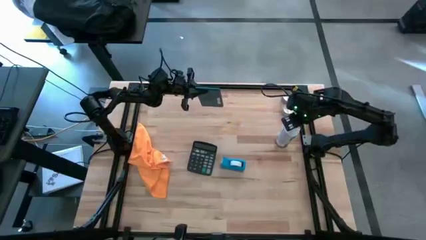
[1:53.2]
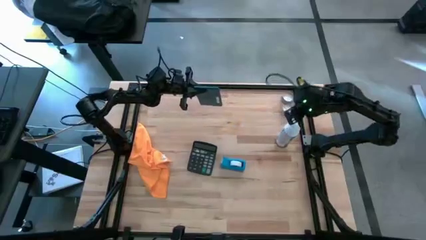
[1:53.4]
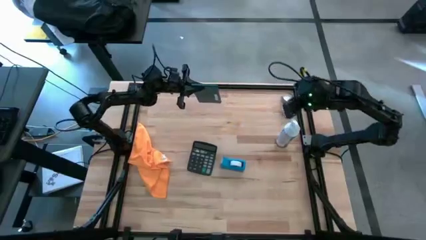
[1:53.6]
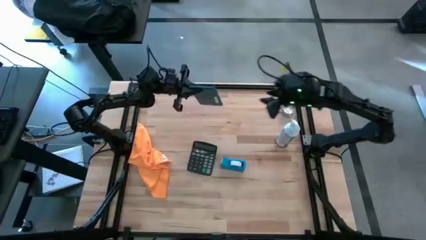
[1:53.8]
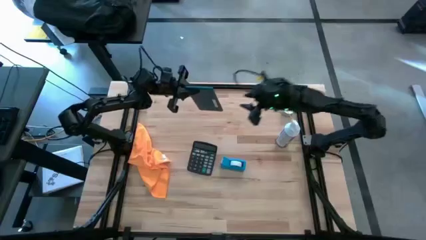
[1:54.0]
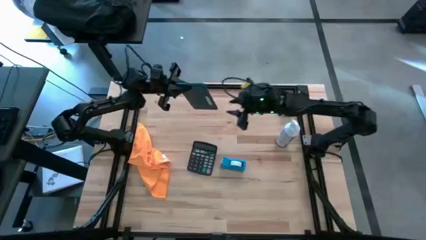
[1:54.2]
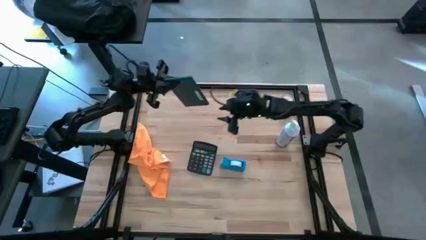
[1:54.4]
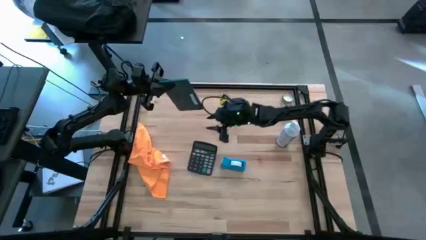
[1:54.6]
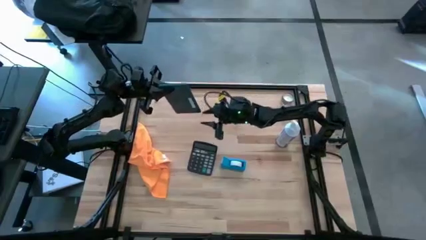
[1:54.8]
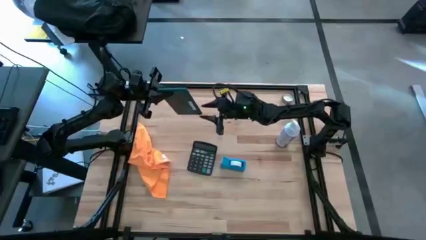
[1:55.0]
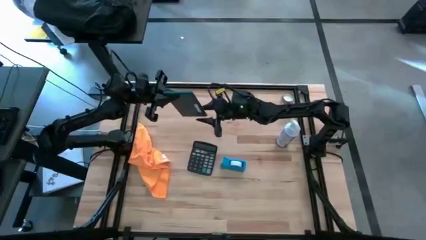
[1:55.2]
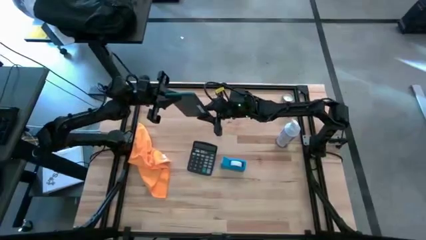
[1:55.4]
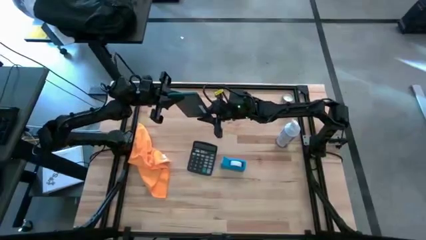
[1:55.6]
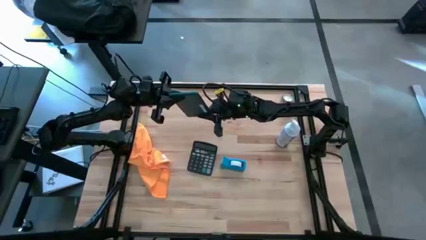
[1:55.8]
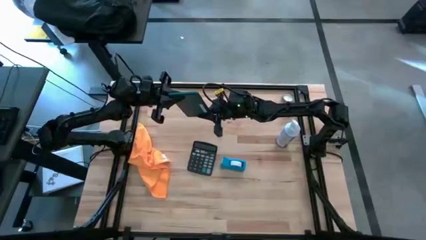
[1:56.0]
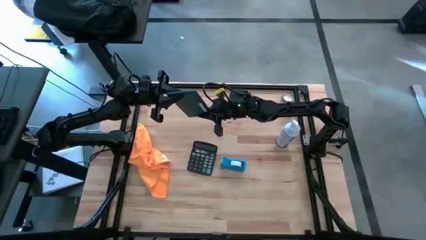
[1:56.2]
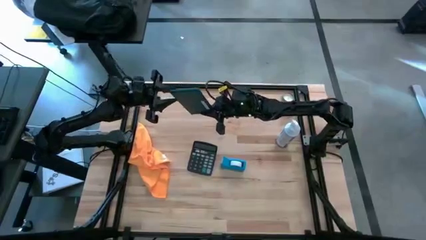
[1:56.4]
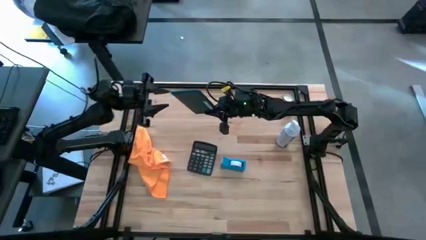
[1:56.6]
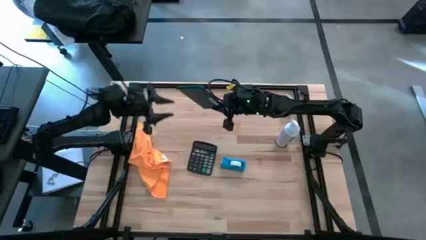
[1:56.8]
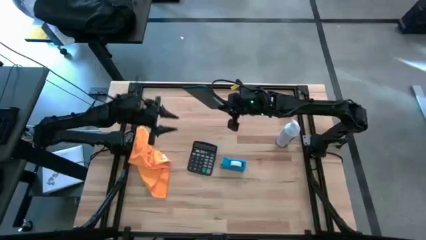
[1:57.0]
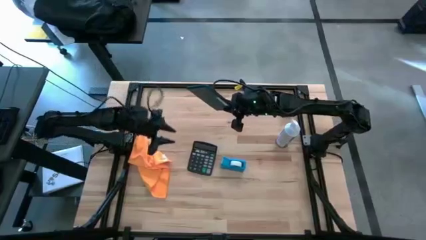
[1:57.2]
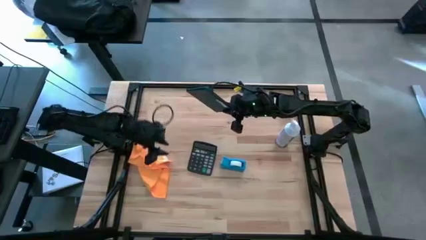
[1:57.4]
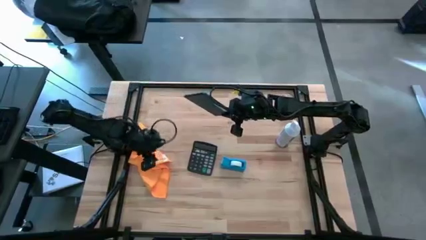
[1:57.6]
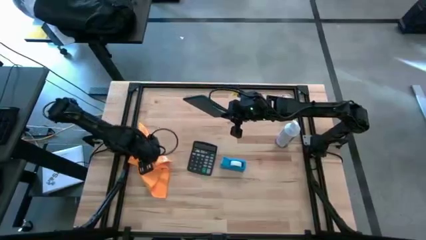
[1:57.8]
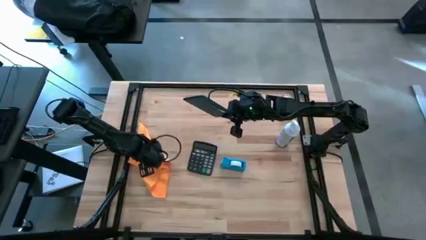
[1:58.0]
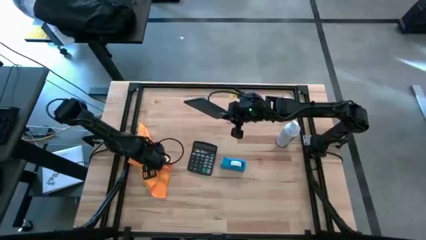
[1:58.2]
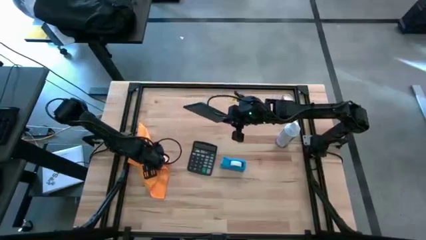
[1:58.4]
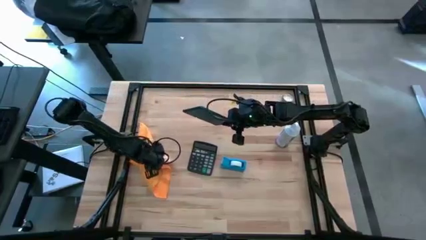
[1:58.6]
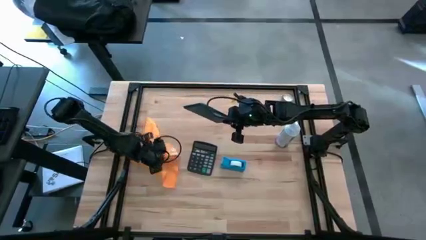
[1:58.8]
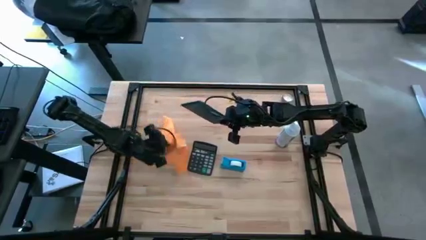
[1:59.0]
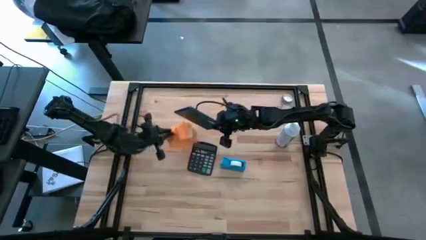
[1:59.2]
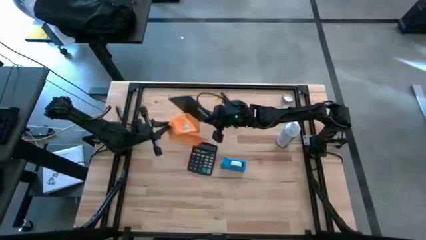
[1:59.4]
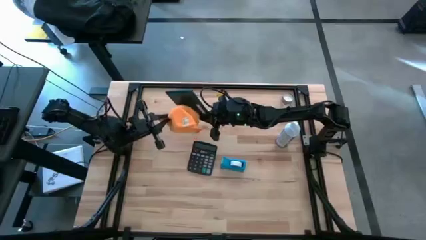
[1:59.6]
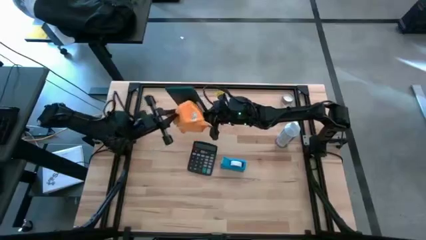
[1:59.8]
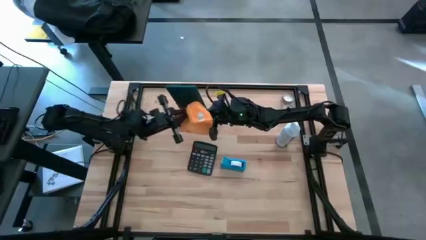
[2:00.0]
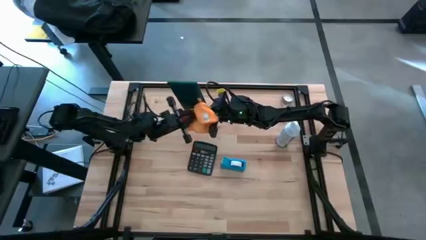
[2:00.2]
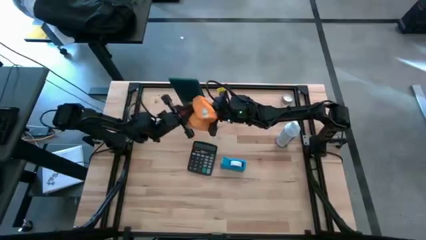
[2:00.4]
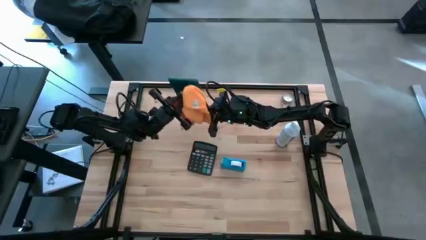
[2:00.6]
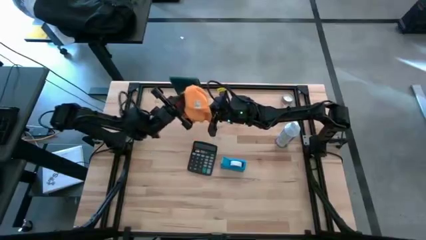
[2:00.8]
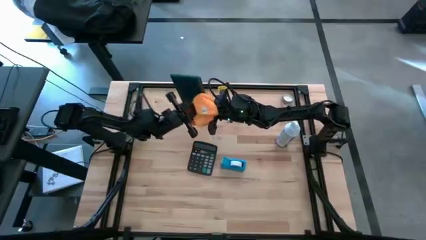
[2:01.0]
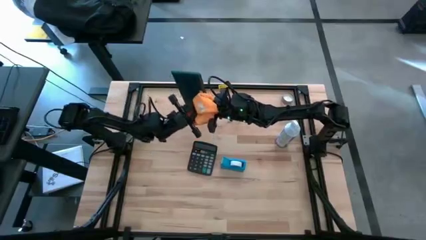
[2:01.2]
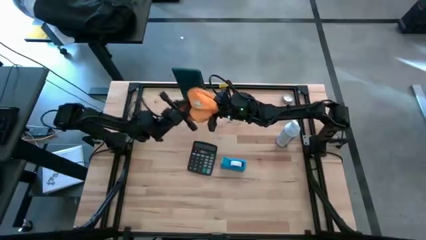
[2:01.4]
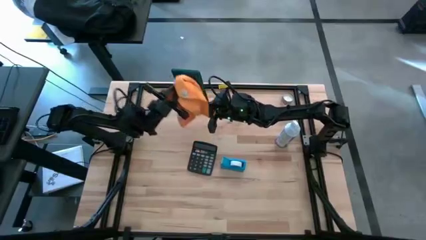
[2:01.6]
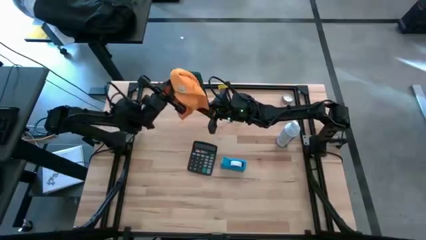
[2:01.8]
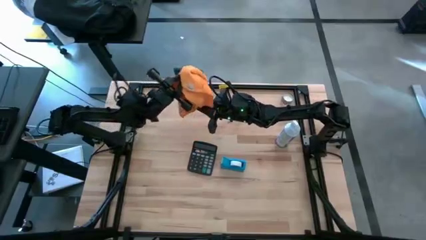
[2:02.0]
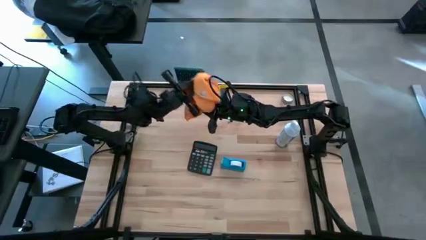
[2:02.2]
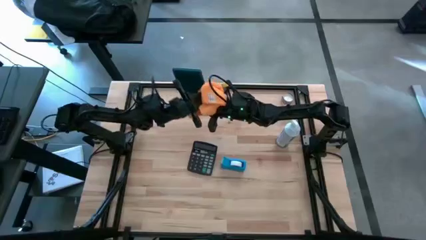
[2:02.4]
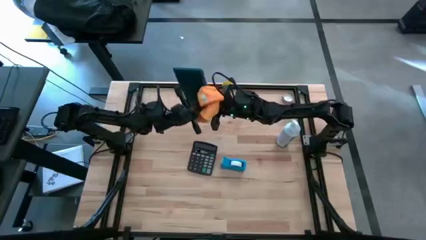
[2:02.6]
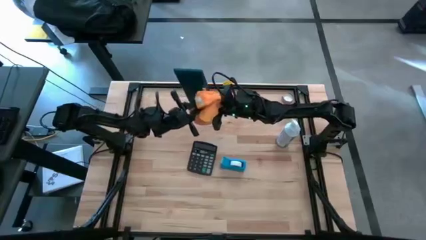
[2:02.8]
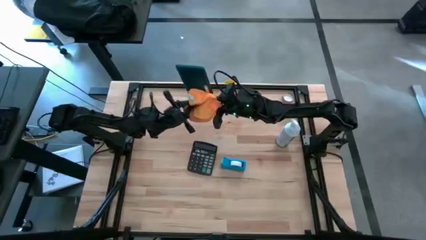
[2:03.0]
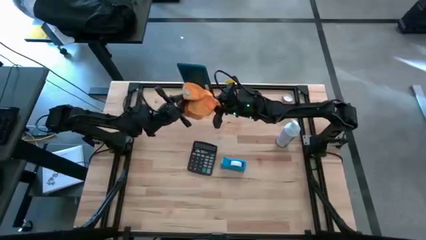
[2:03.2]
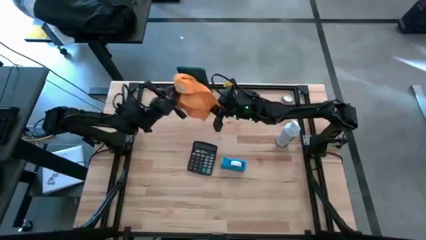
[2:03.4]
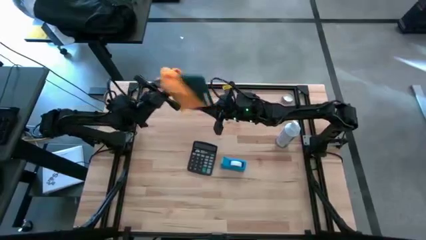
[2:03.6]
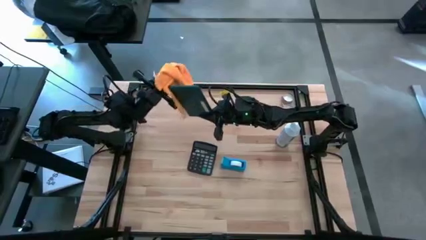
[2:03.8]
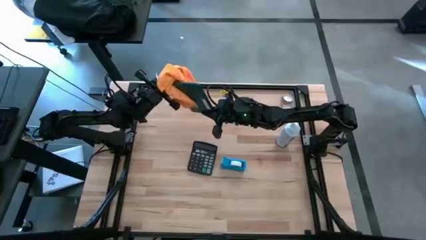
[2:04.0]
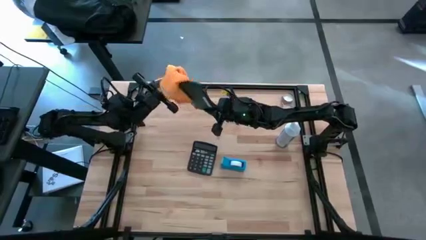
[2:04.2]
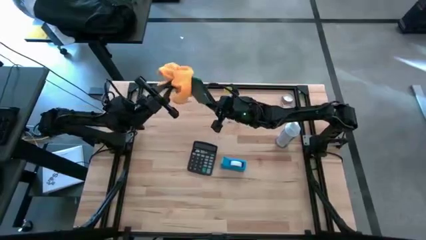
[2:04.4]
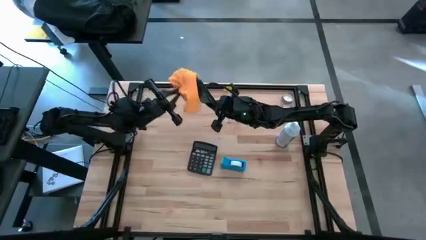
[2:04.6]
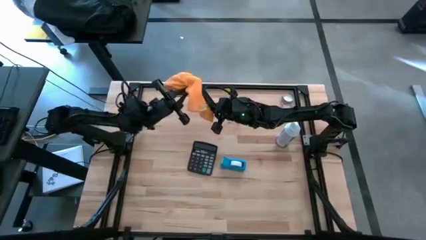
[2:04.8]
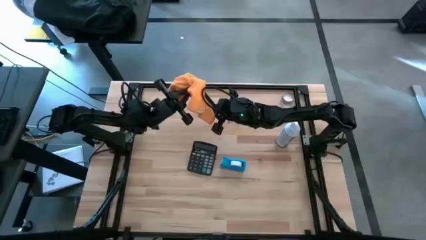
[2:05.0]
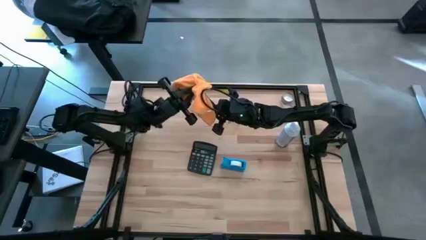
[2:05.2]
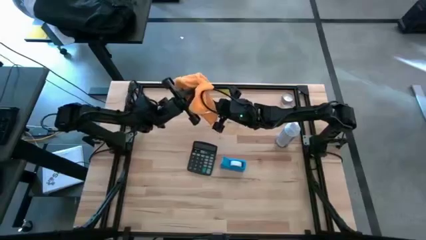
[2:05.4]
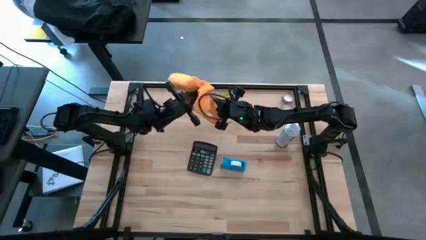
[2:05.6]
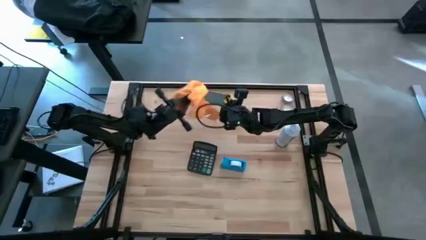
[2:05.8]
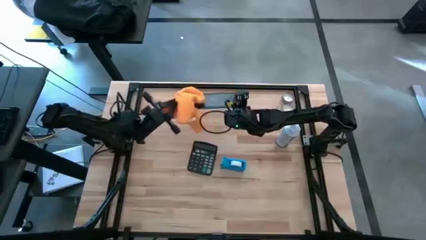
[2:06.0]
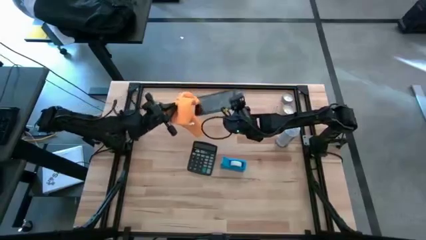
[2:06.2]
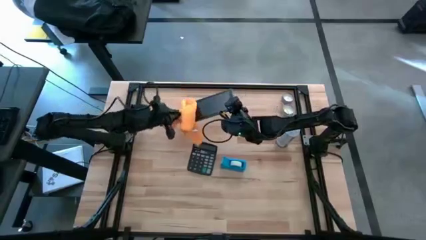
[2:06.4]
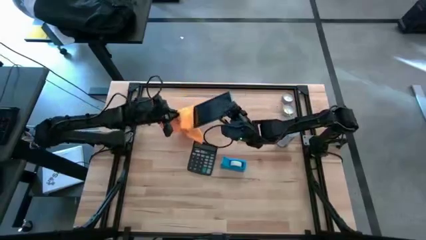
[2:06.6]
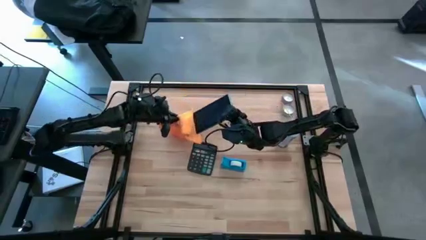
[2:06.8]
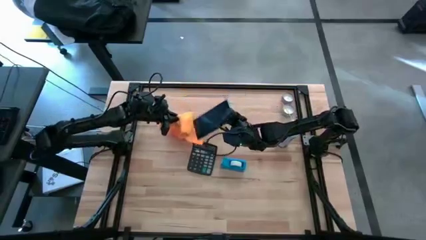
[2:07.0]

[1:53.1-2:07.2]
Task: Apply microfiber cloth
Wipe the back of the cellphone with the microfiber cloth
